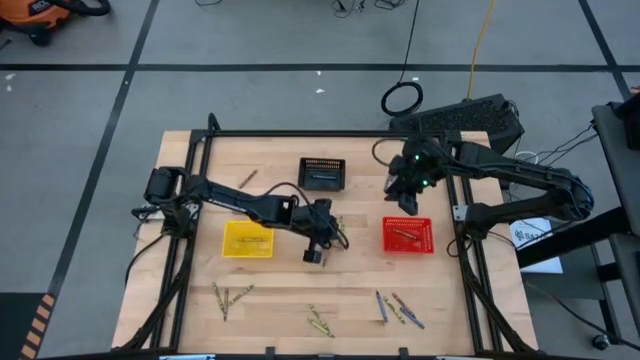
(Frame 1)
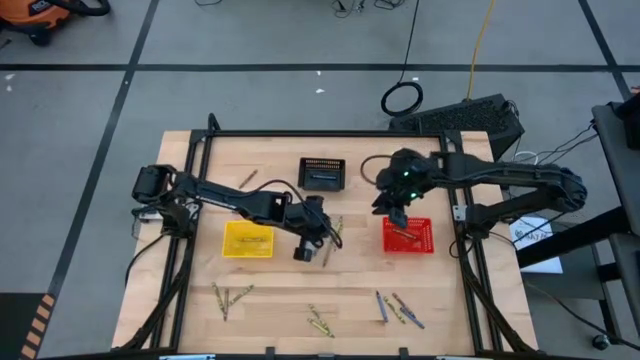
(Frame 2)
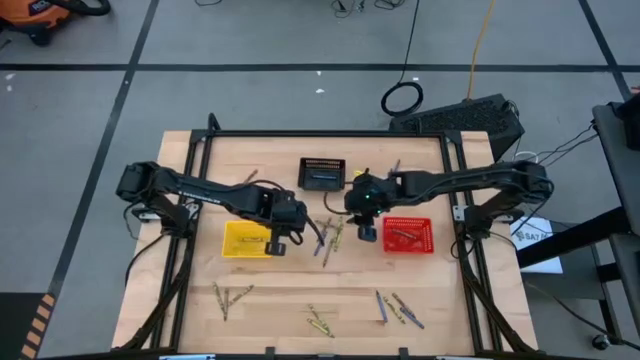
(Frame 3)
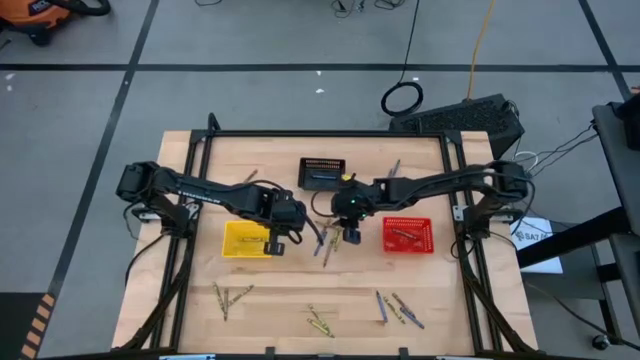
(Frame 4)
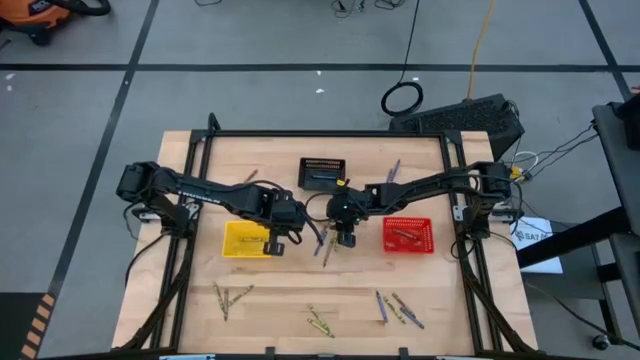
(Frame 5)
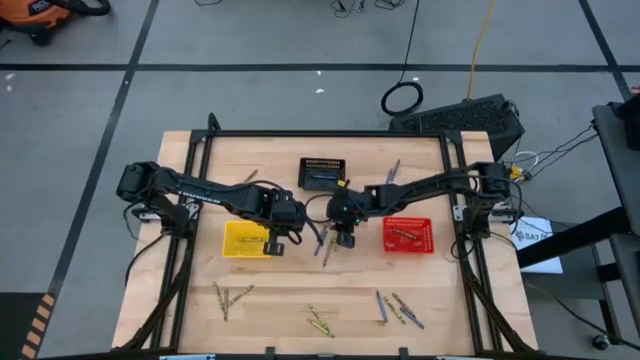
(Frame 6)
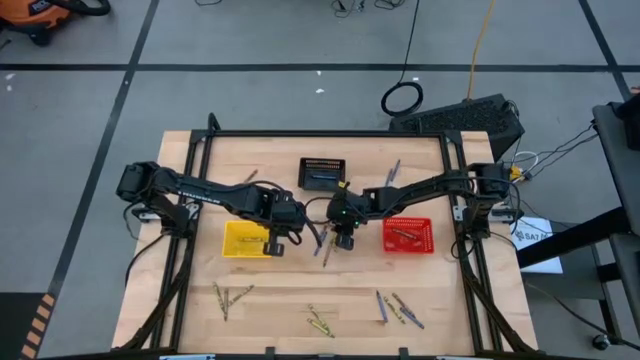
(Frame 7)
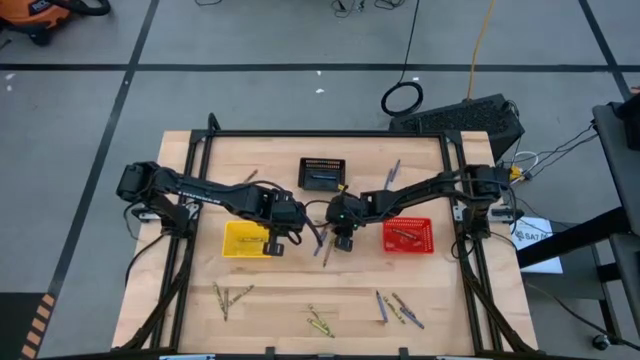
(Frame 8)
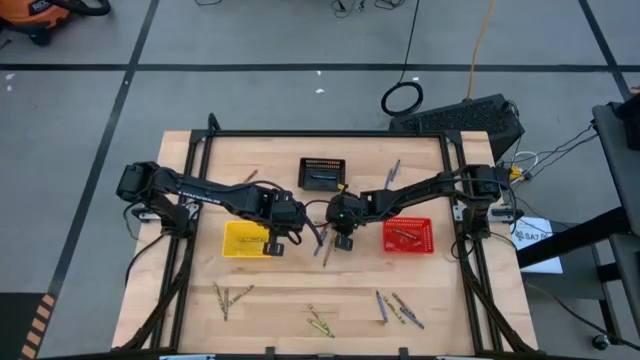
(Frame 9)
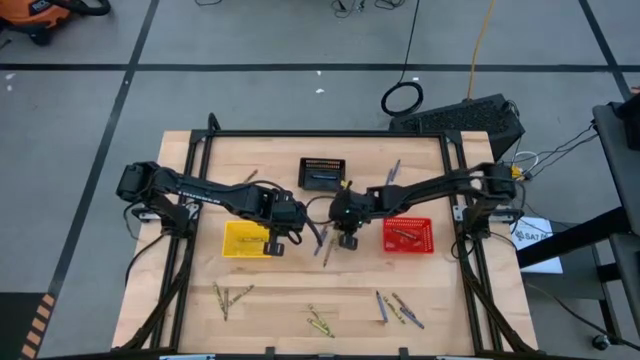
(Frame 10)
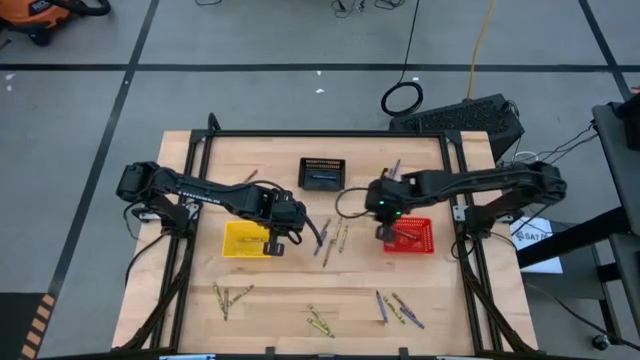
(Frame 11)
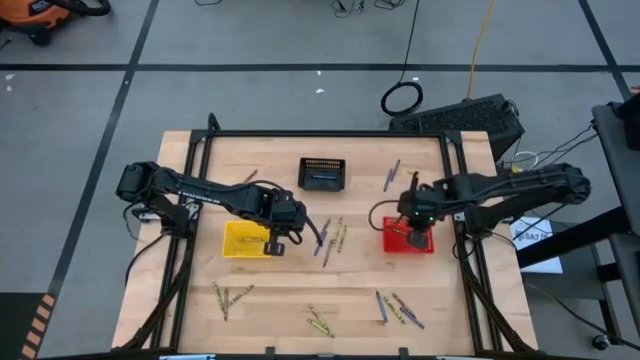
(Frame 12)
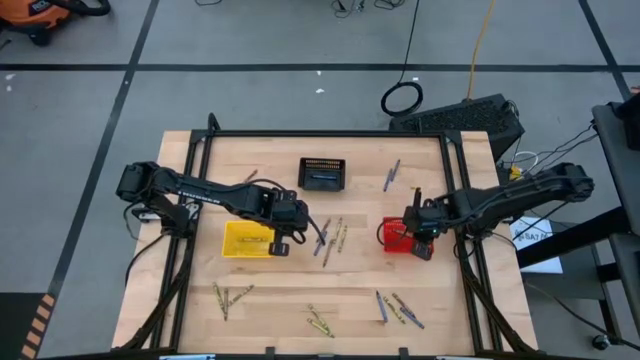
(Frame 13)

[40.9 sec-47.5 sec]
Task: Sort crayons
Put the brown crayon into the red bin

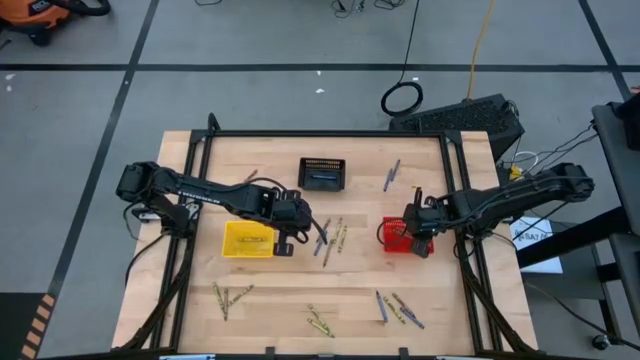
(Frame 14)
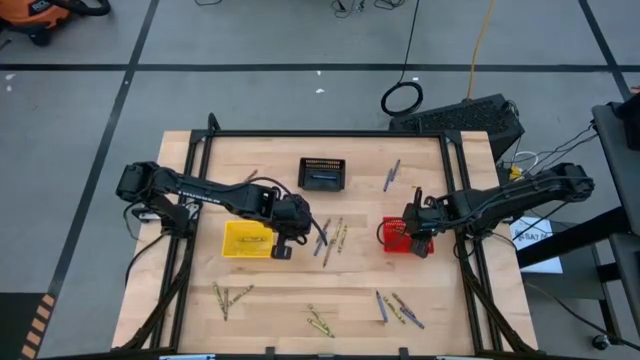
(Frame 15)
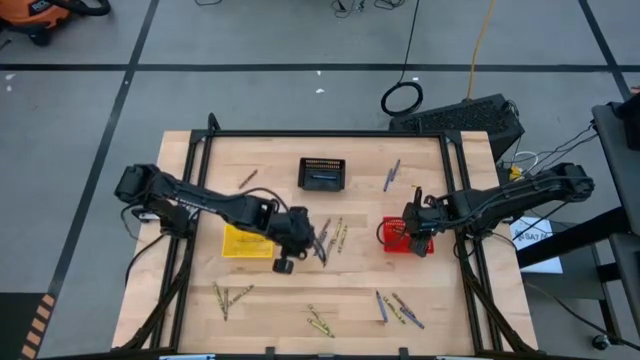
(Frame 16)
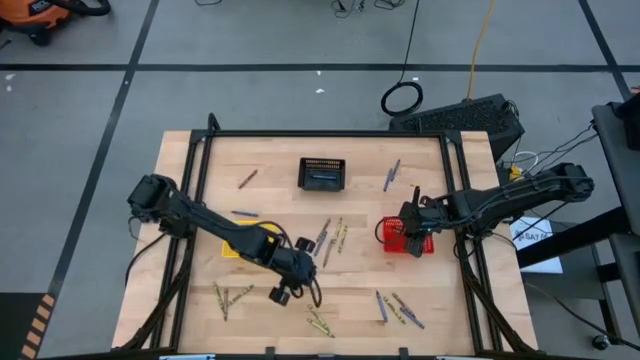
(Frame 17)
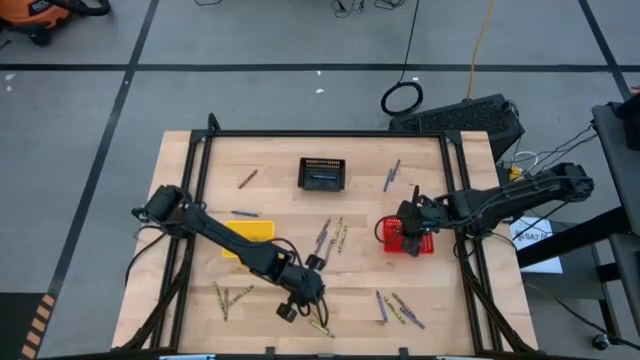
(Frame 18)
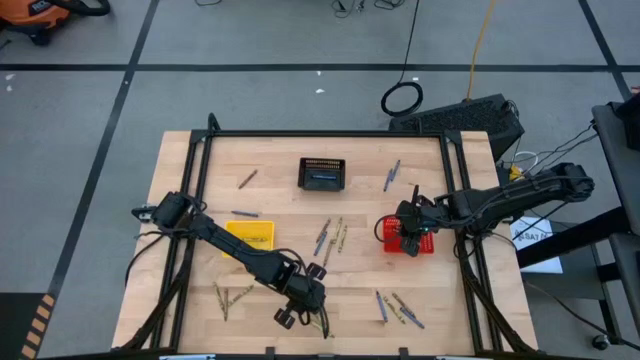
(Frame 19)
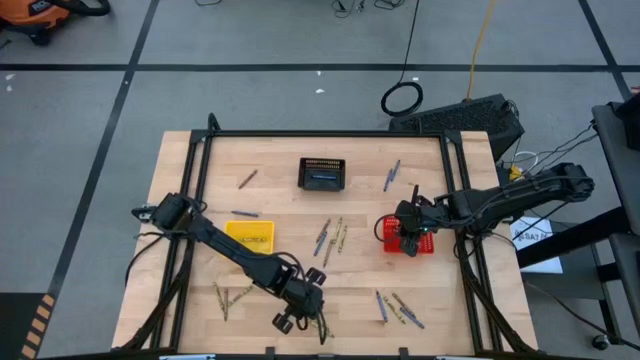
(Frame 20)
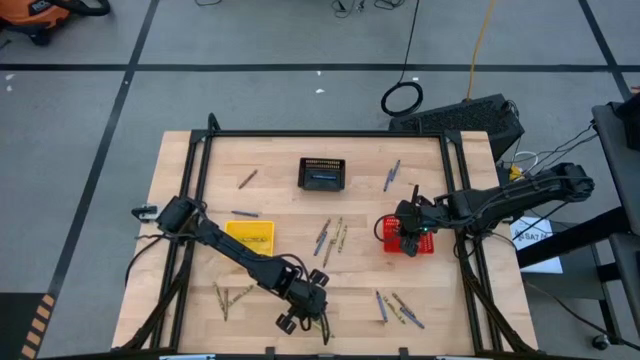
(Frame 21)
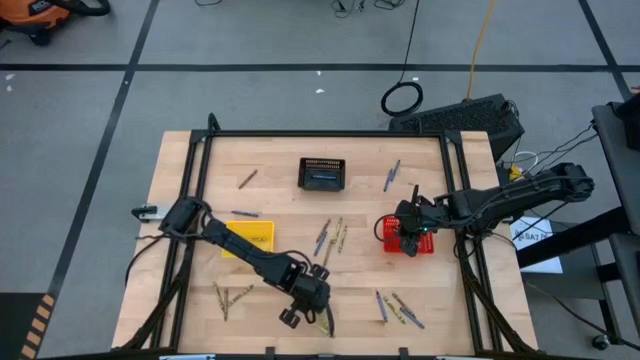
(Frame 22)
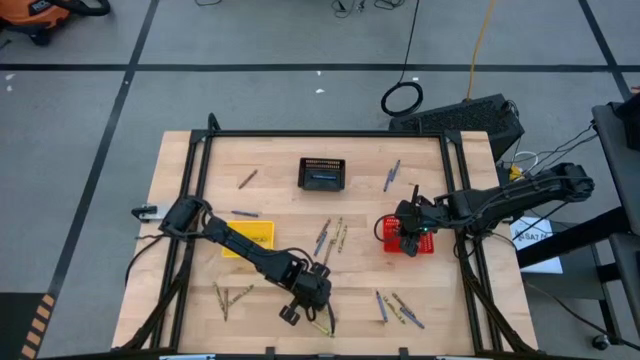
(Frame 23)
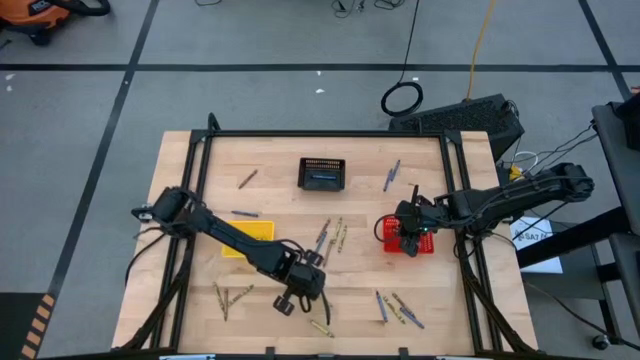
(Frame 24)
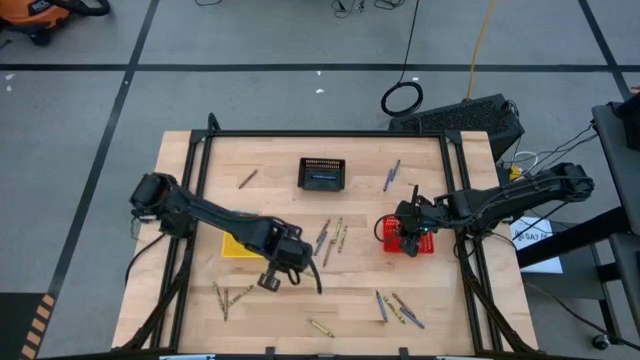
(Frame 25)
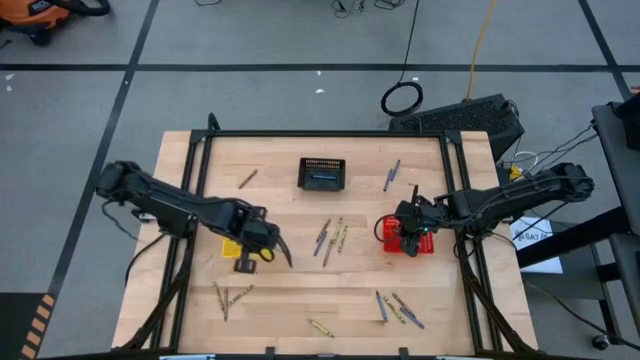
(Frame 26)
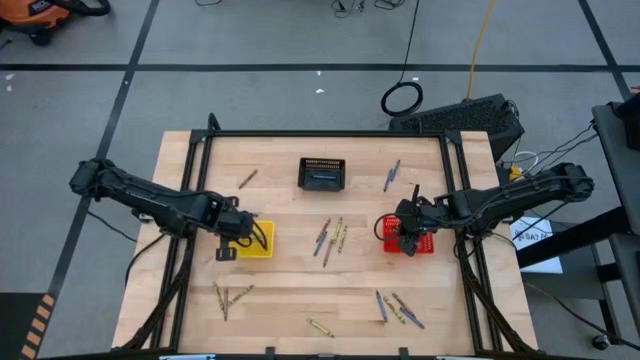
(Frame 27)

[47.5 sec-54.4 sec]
Put the green crayon into the yellow bin

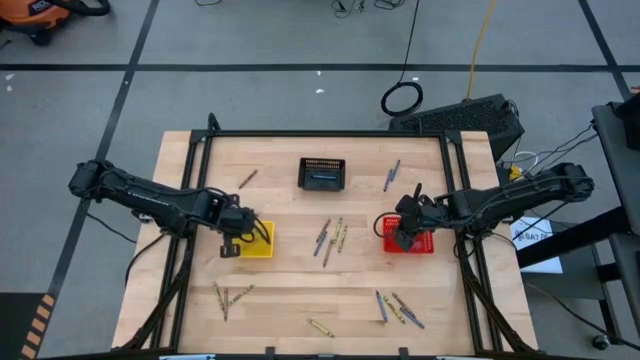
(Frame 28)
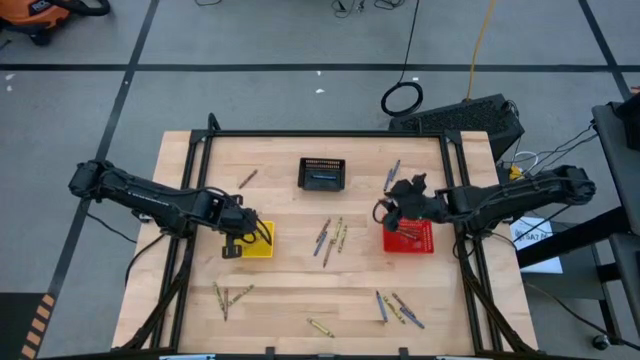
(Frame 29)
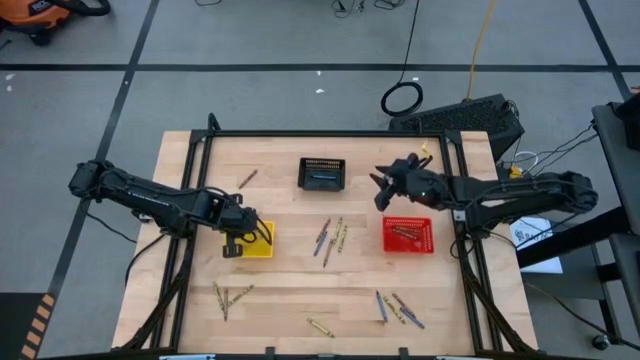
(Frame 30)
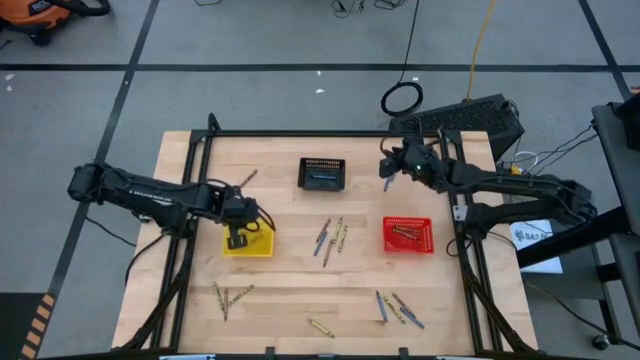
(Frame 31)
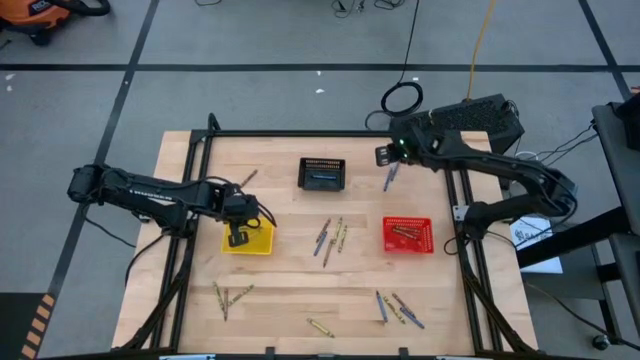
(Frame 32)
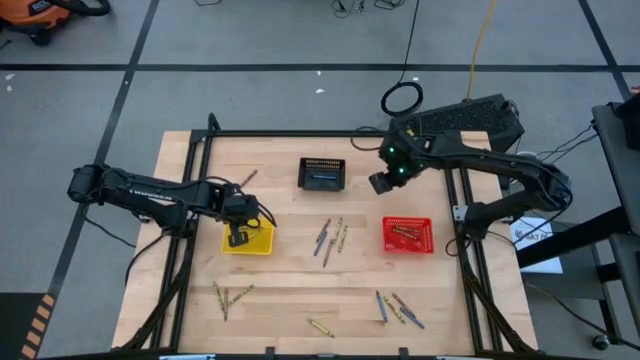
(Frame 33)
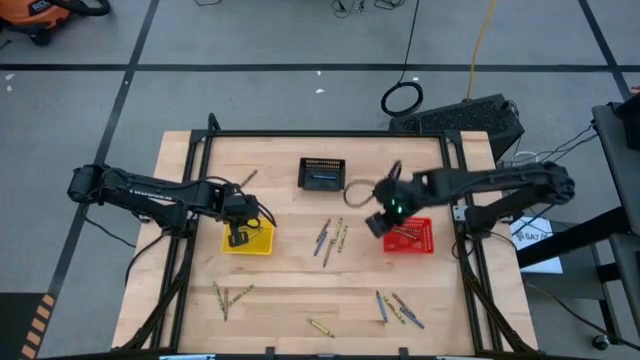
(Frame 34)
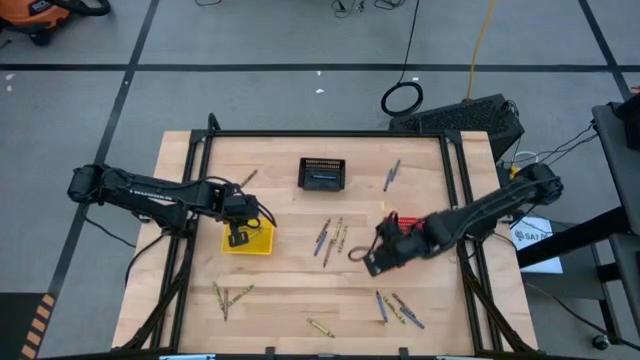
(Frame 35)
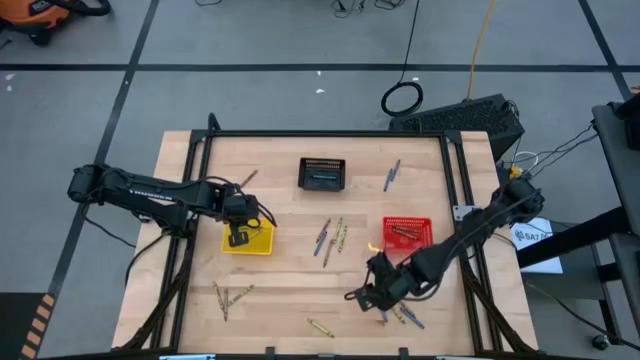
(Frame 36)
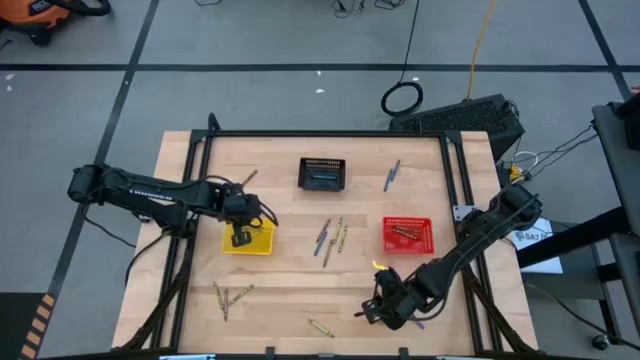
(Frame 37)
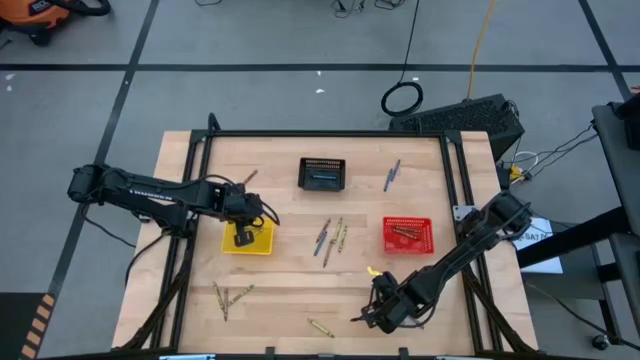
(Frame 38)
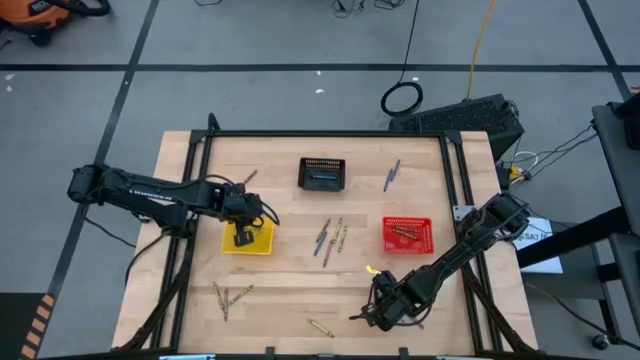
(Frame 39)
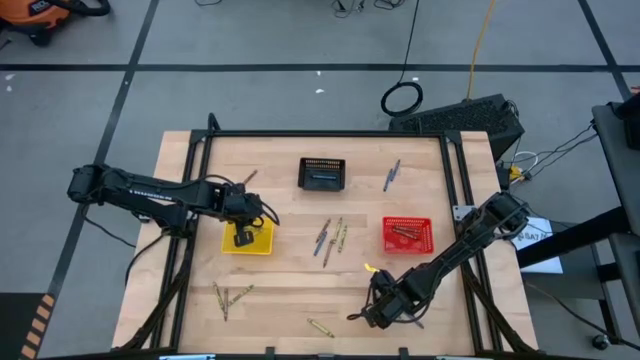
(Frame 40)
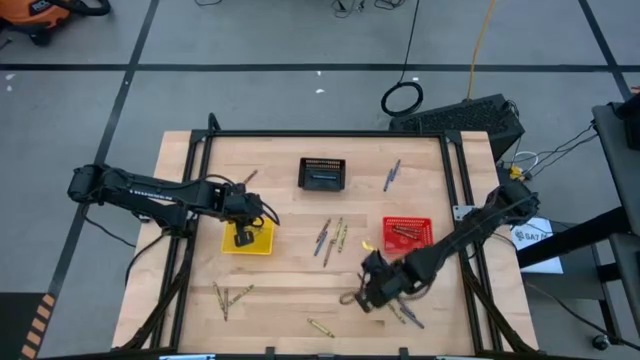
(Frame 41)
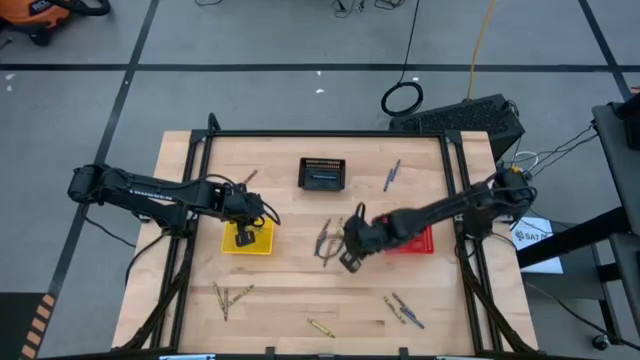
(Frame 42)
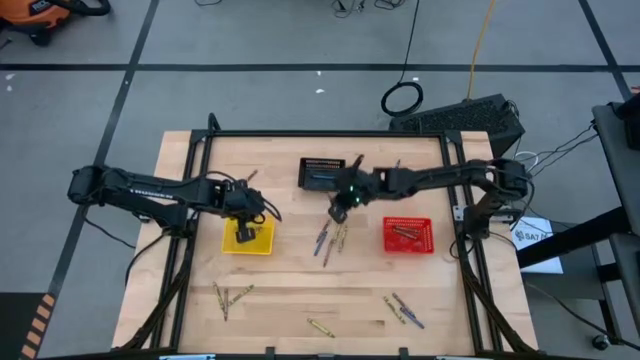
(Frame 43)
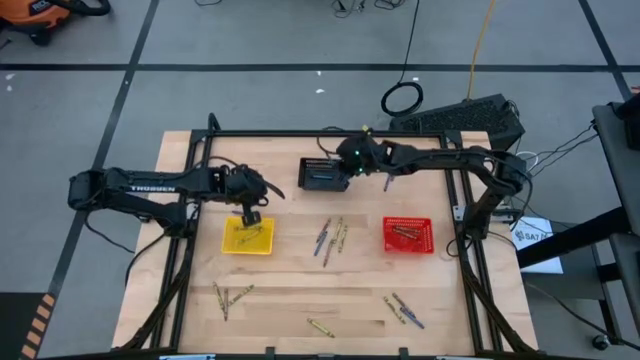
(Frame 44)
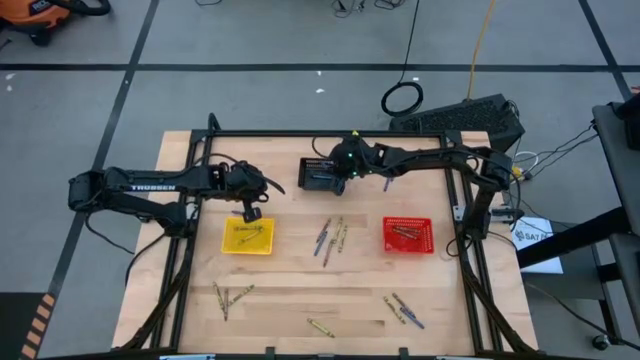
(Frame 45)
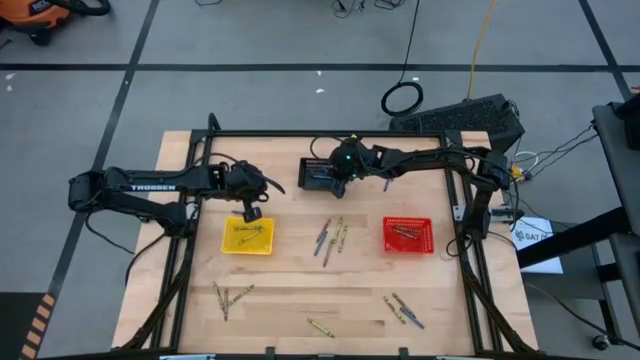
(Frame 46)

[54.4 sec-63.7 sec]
Put the blue crayon into the black bin
